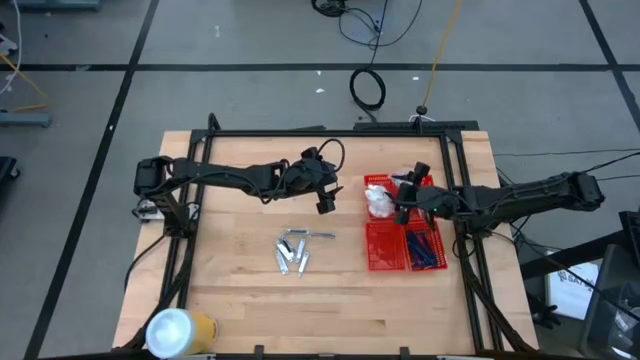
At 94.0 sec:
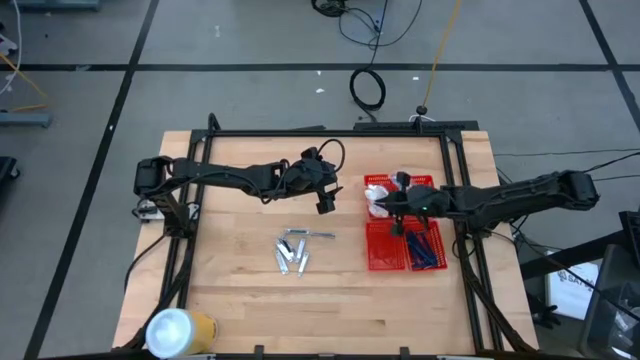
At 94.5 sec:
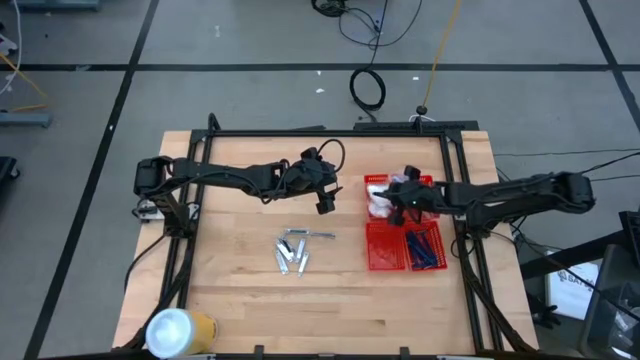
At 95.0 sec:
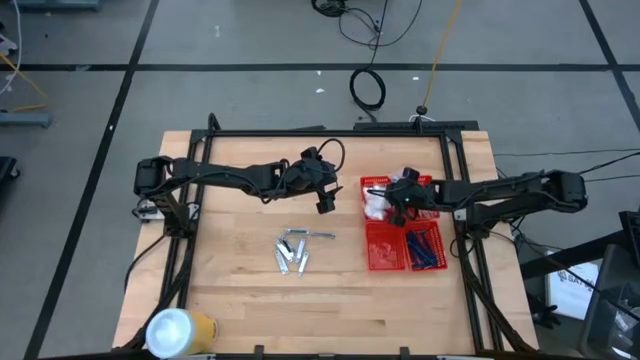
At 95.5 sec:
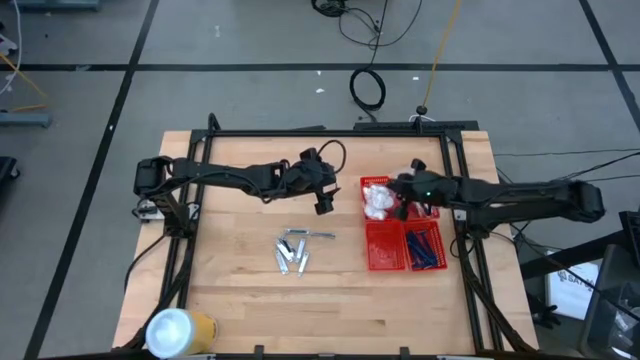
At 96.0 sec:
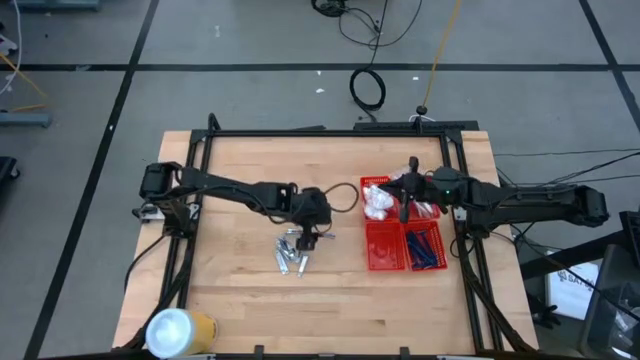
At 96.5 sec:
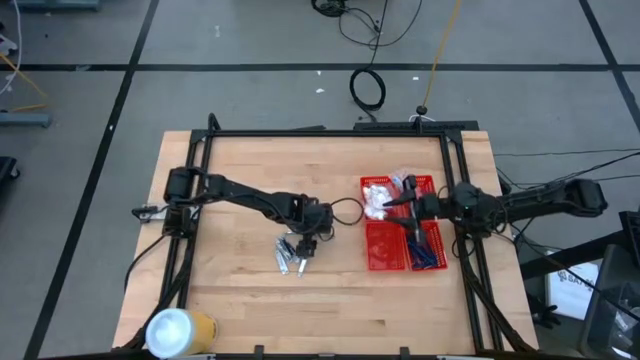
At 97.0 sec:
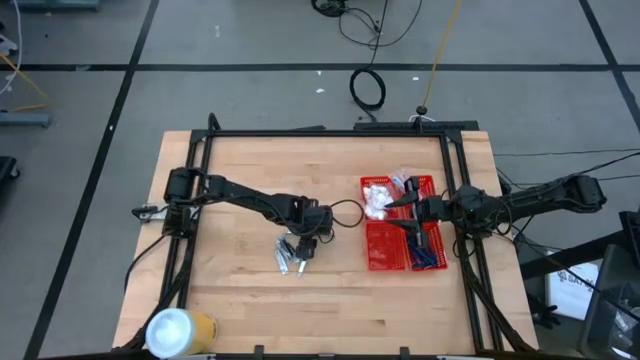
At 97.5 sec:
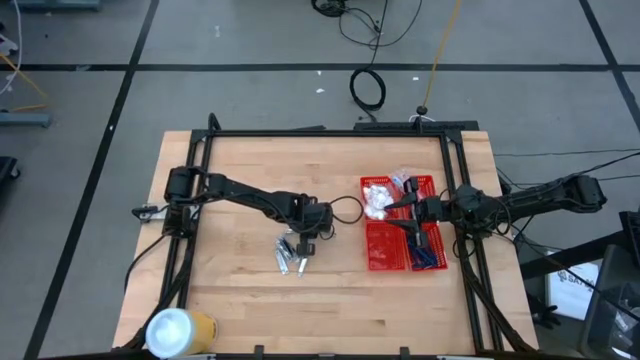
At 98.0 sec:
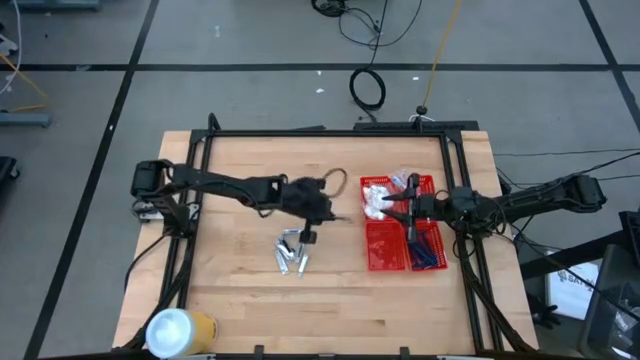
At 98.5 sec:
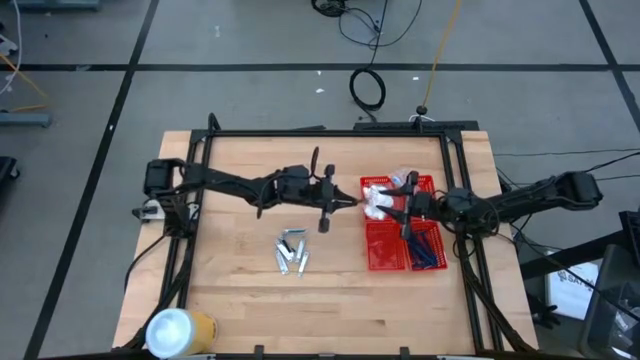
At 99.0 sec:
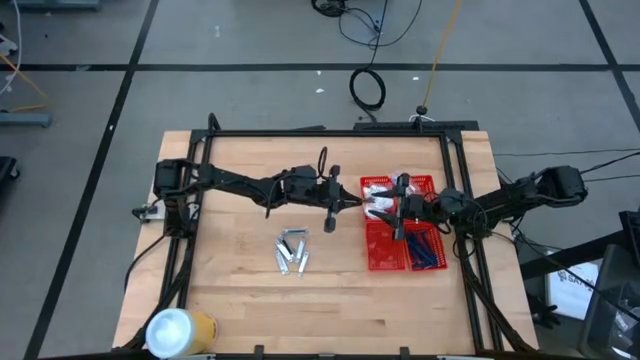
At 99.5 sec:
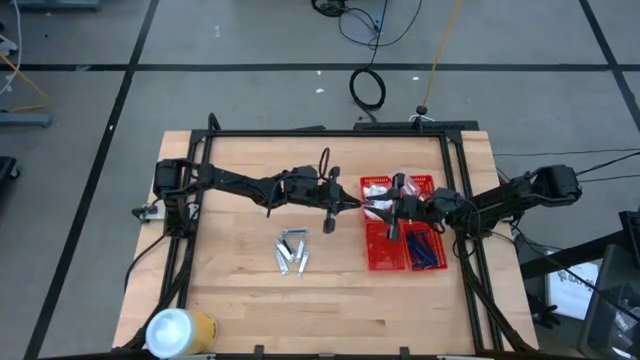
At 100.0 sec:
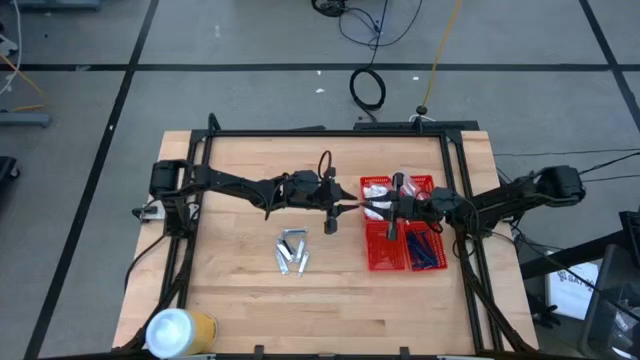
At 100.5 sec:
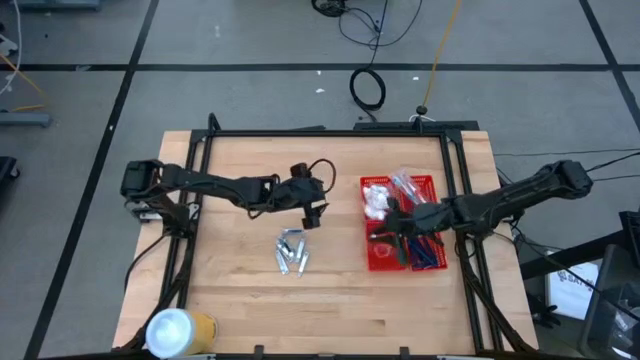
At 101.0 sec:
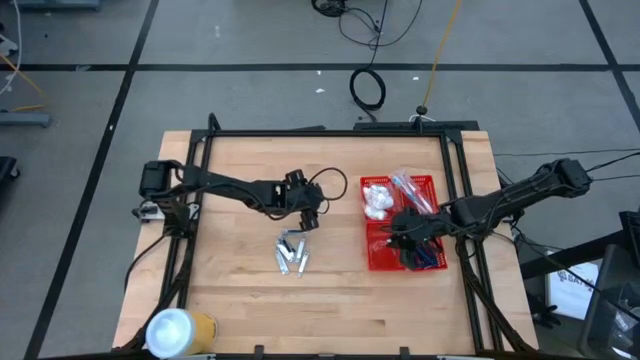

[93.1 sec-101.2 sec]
Task: Pick & Place Travel size toiletries
Put the nail cutter into the bottom left red bin

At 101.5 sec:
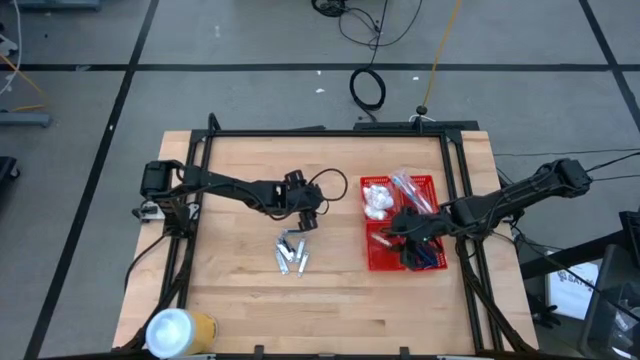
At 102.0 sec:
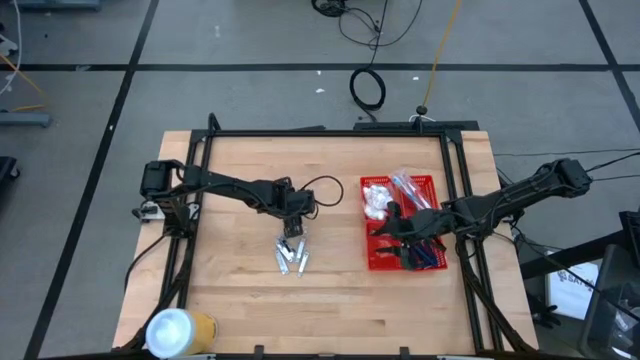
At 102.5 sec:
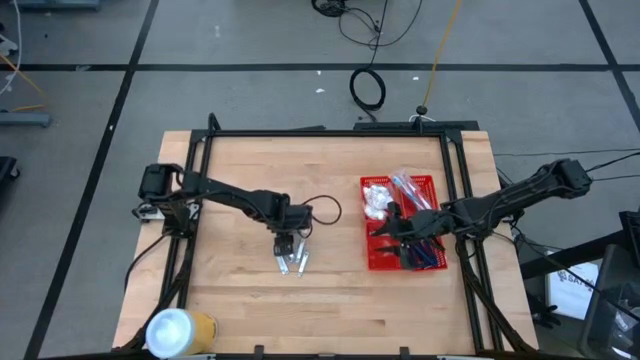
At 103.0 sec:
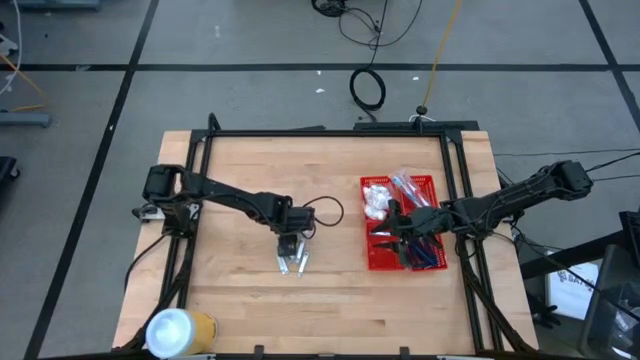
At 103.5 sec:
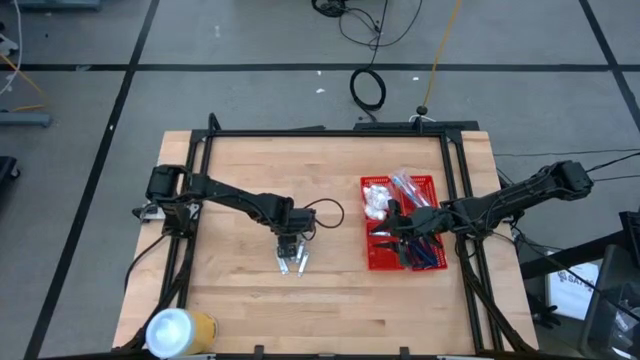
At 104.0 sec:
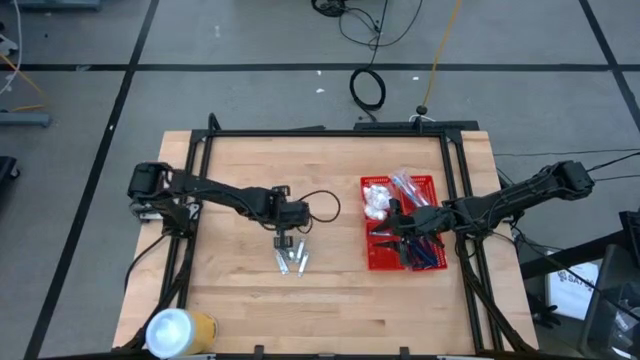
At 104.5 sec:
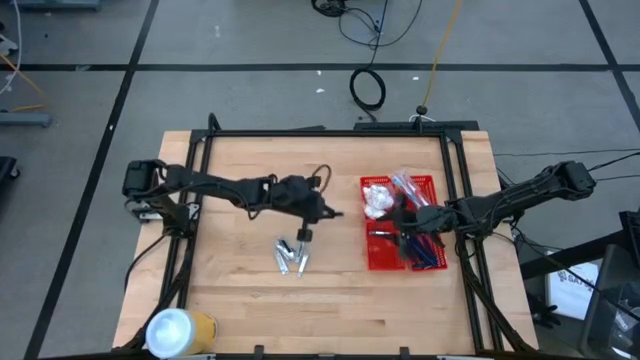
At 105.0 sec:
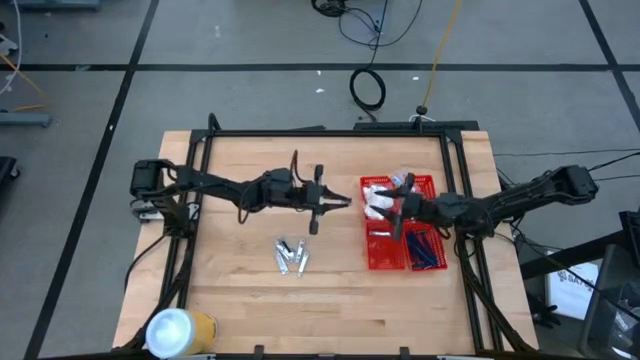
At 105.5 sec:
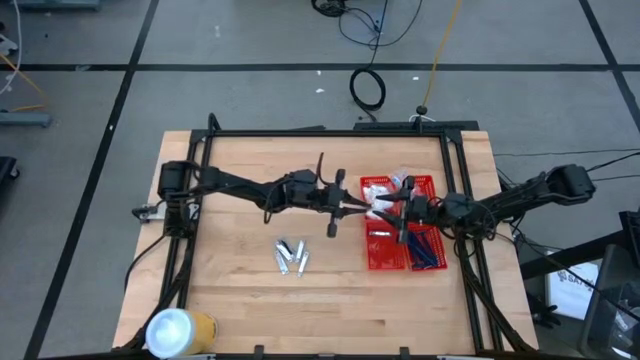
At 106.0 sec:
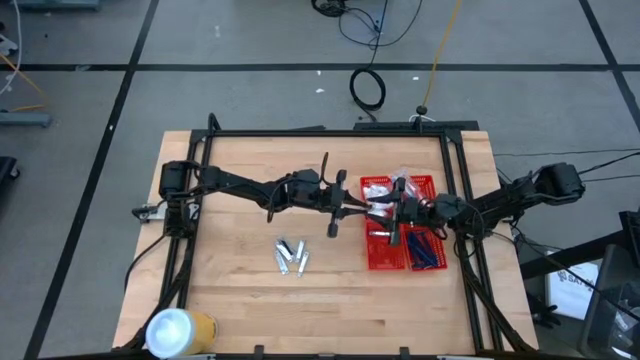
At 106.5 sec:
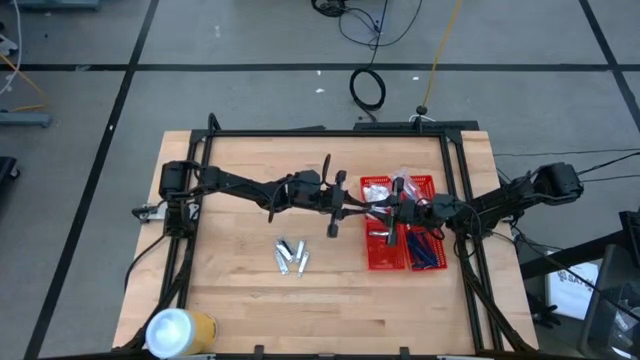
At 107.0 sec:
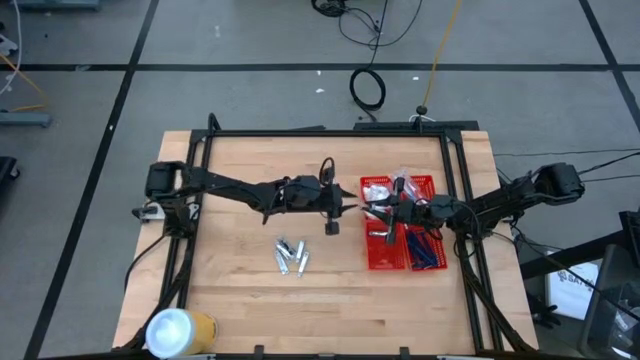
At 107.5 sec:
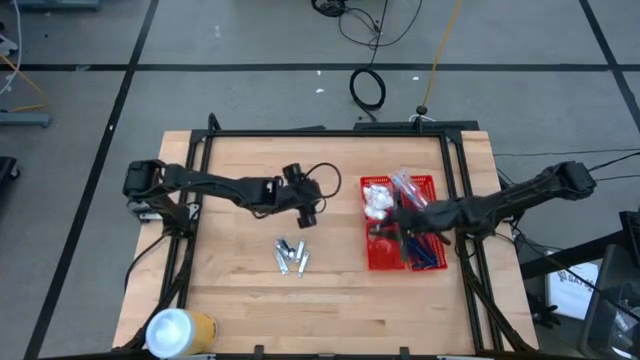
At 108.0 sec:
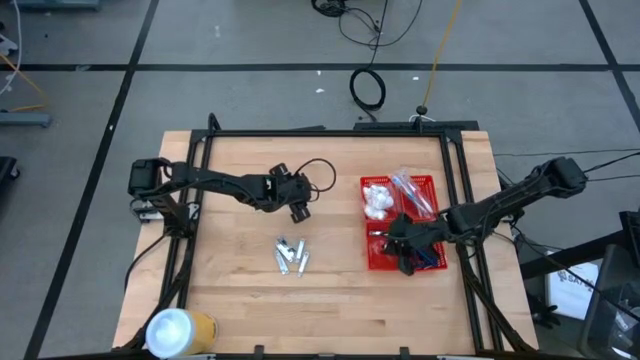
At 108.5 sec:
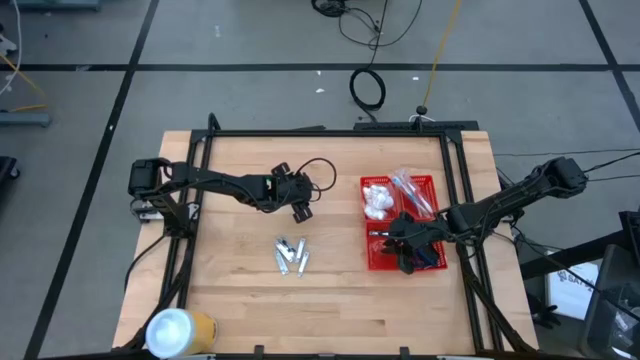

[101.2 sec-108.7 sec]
Put the nail cutter into the bottom left red bin

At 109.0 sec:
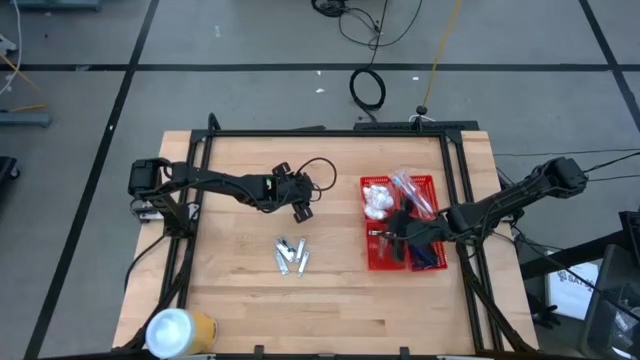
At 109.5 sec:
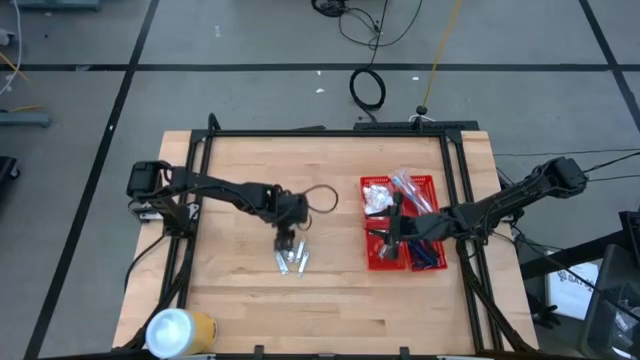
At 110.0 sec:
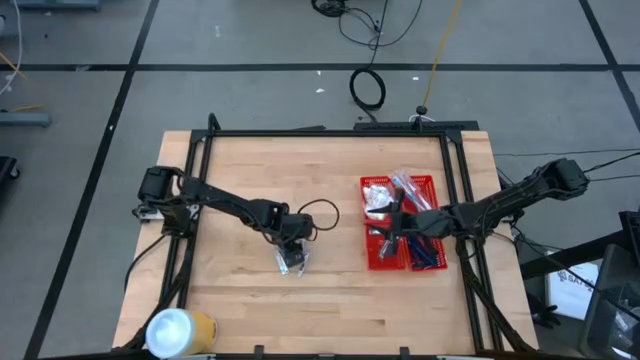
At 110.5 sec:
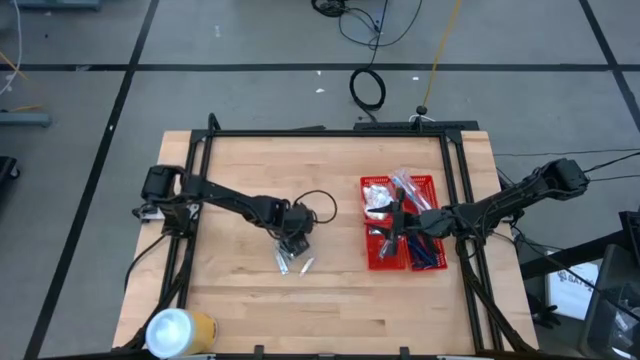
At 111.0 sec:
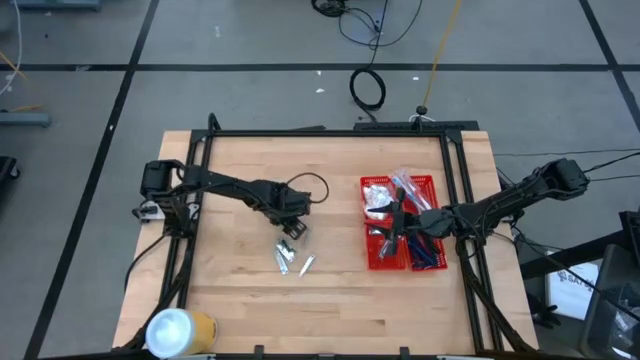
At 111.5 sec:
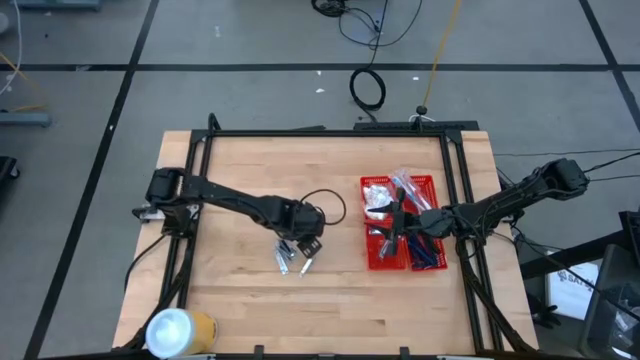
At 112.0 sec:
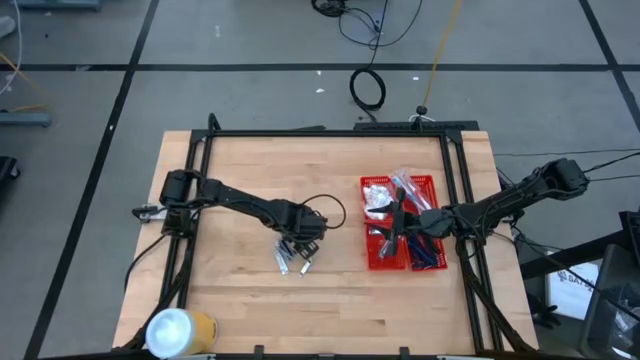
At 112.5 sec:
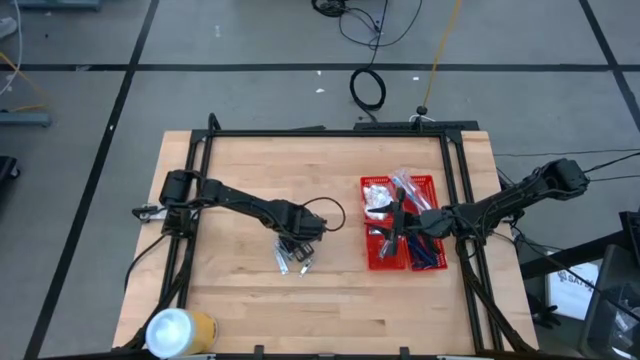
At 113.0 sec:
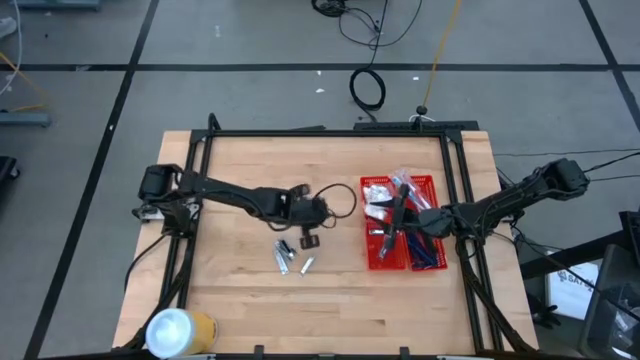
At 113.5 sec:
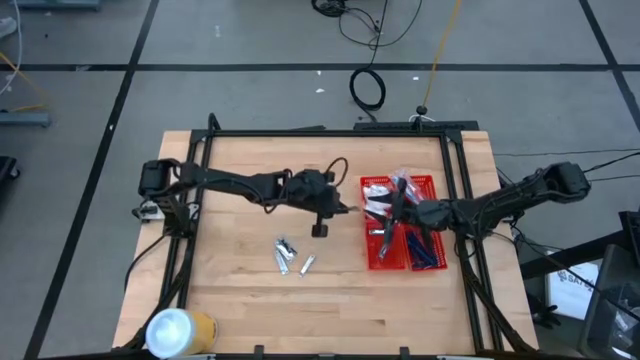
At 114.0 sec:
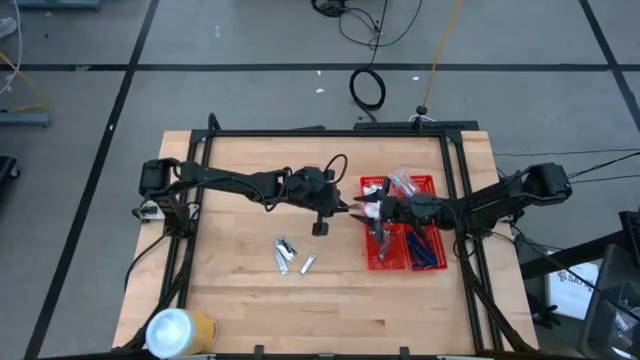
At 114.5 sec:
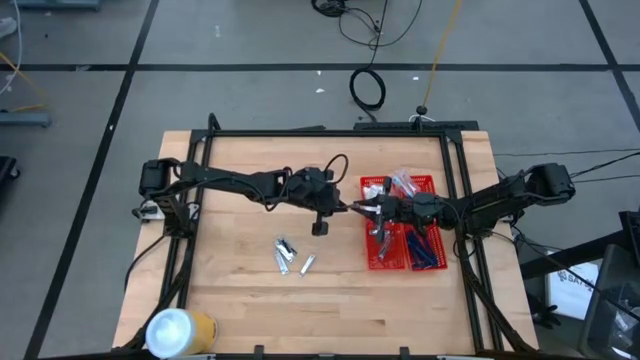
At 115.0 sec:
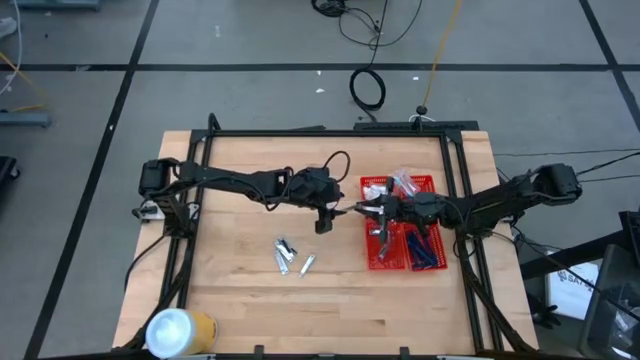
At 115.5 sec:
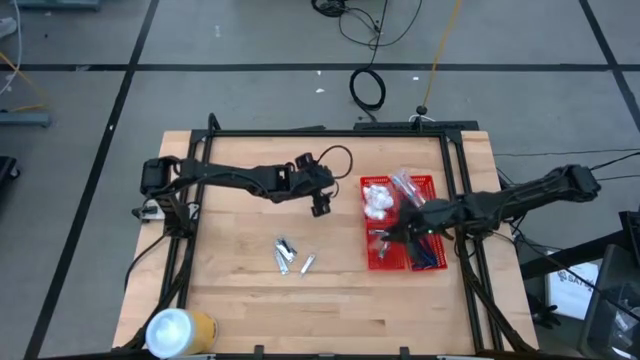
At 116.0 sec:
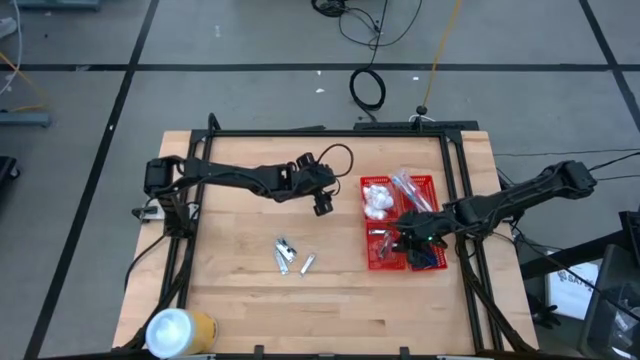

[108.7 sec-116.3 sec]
Put the nail cutter into the bottom left red bin
